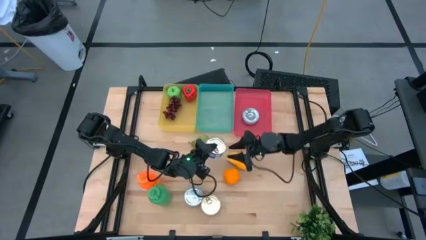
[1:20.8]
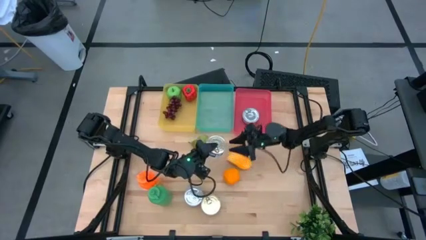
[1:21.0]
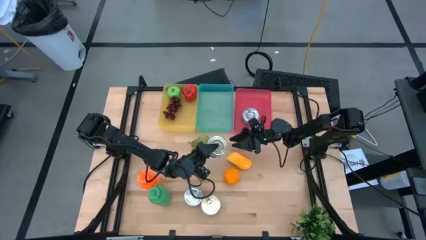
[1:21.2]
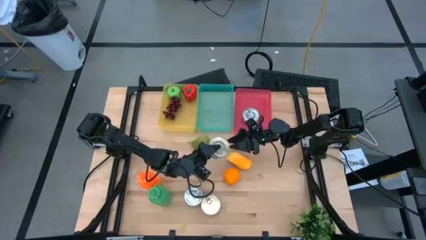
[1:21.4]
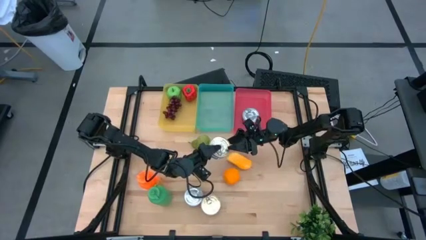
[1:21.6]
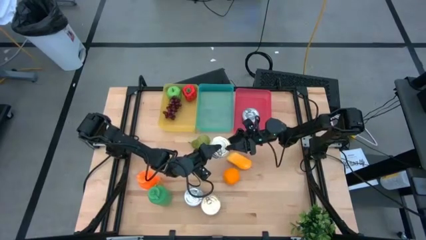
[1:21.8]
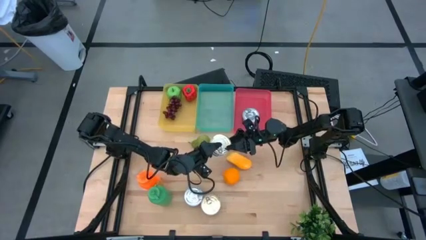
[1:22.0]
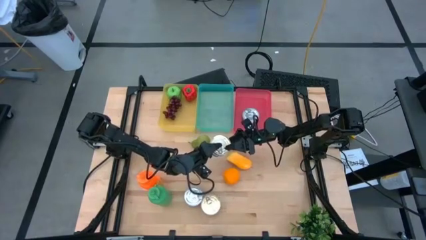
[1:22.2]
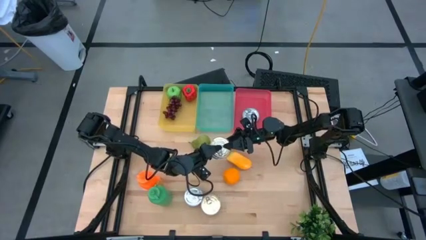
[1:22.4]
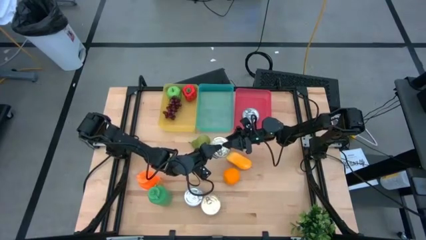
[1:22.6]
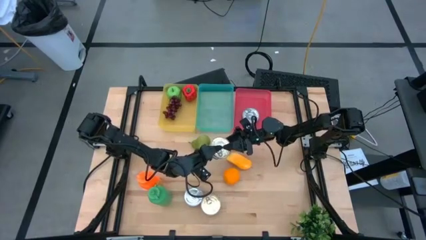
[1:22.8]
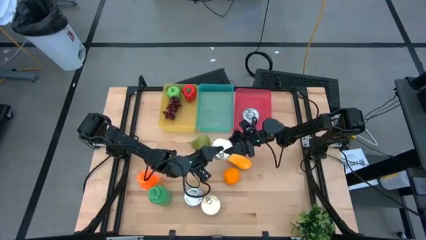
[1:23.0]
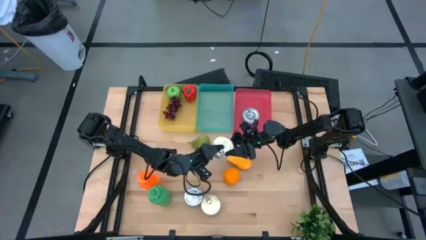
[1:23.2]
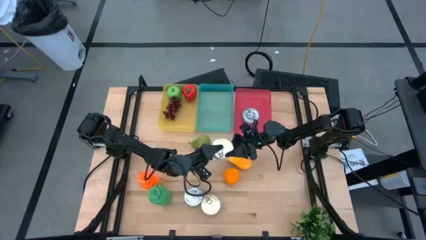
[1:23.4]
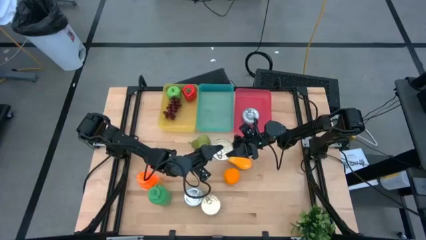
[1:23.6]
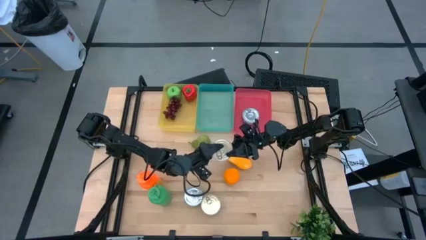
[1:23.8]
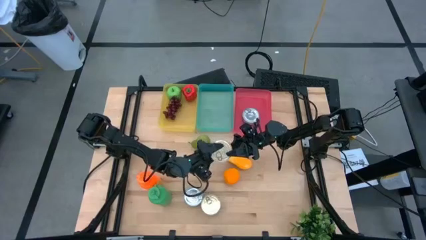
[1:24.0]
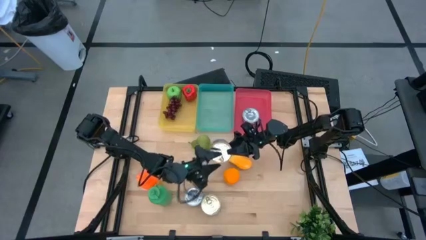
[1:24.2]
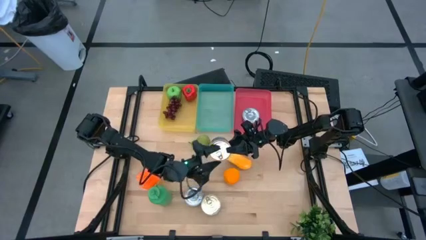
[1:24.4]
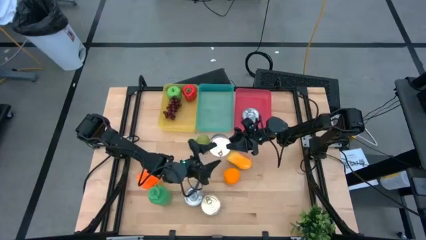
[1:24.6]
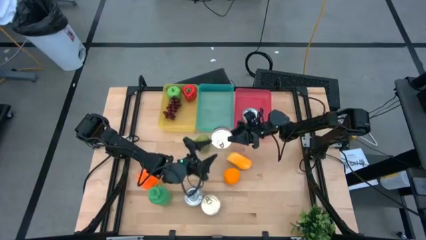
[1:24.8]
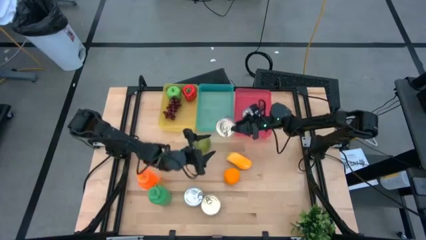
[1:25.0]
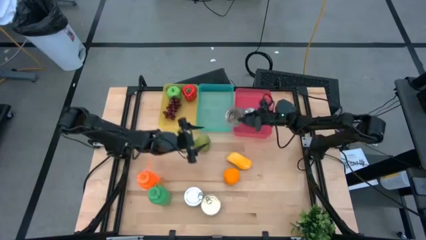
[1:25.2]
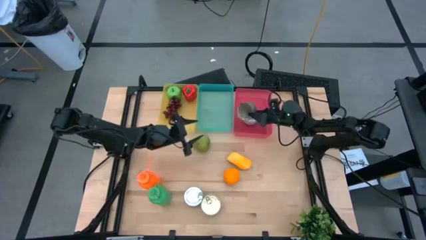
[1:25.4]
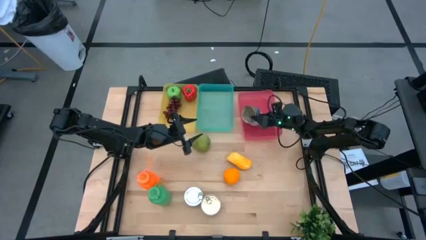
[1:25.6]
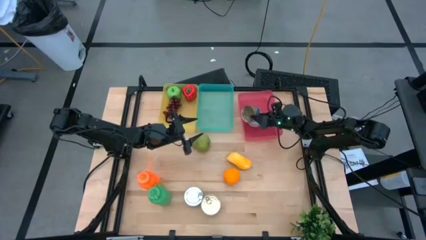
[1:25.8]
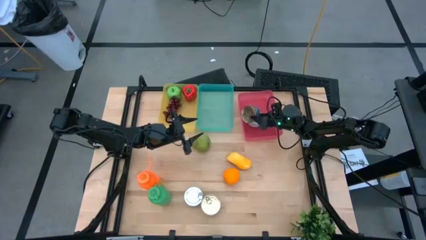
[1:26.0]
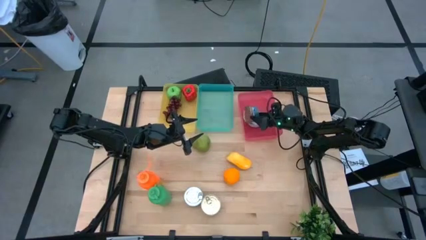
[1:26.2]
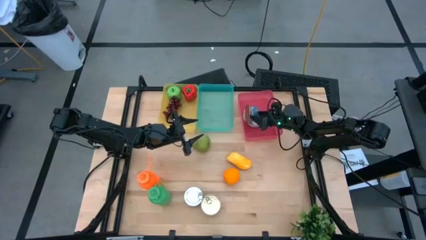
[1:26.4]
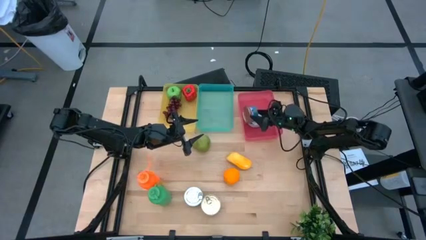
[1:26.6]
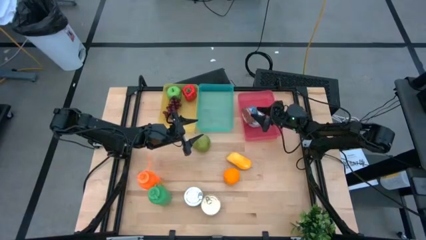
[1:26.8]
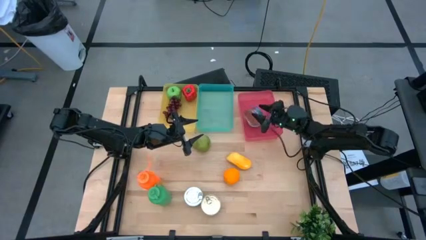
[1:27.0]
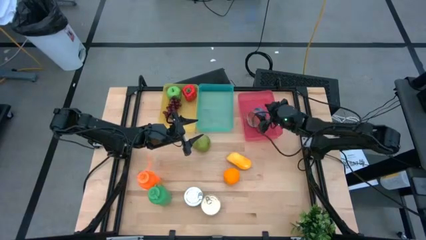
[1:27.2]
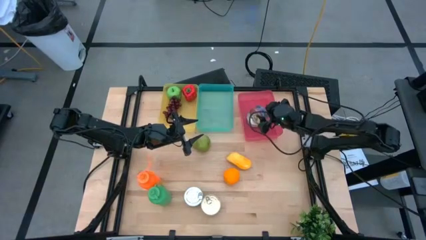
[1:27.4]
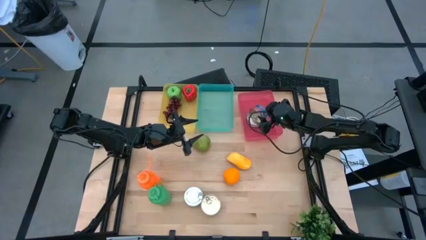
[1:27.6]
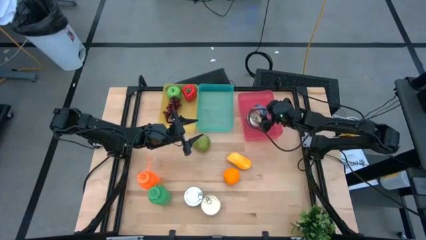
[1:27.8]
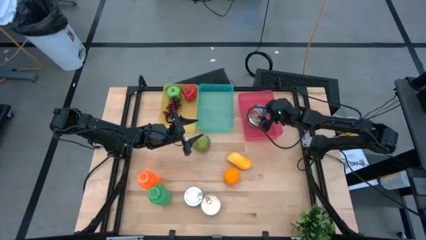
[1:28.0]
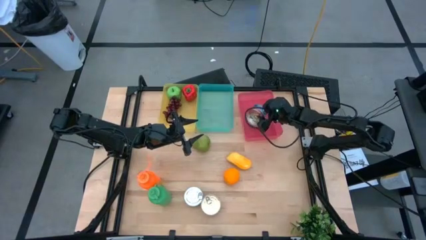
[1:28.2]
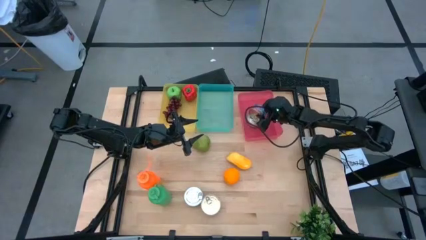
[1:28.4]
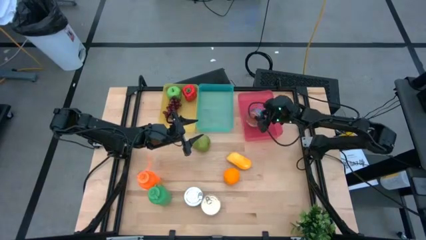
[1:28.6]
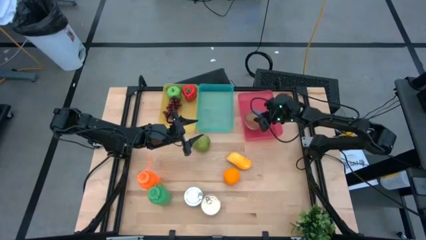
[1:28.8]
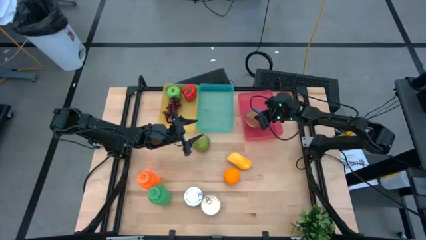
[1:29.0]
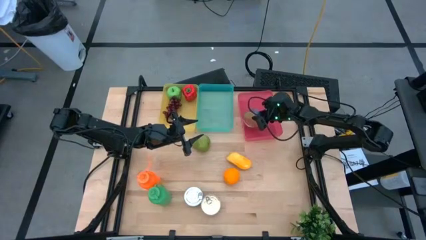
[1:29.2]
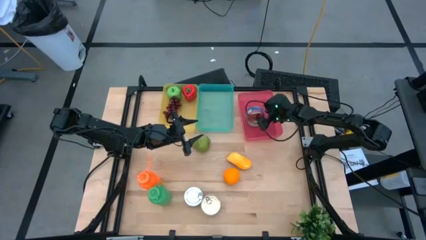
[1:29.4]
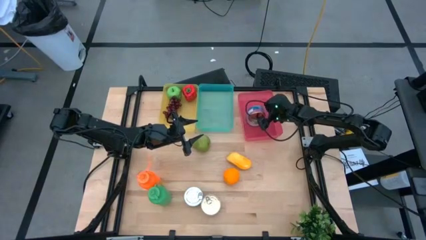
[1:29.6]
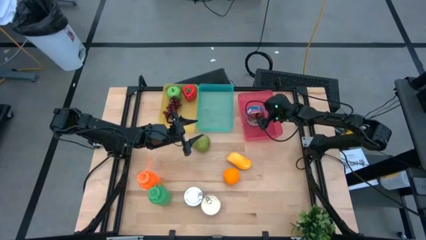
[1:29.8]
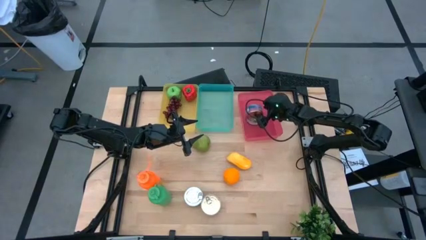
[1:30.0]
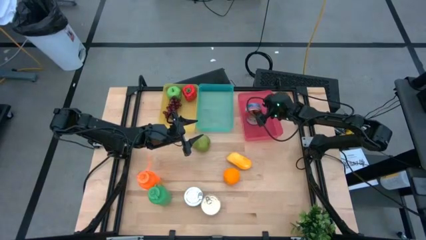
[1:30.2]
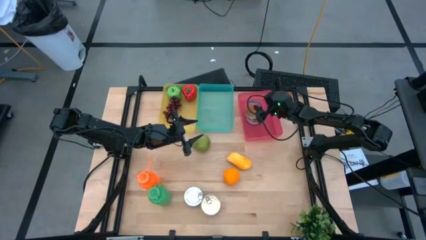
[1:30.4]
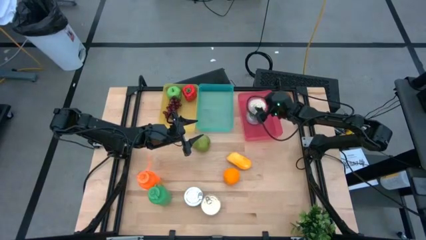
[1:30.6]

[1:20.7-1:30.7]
Task: Pick & Place Food Item
Put the top blue pink tuna can into the red bin

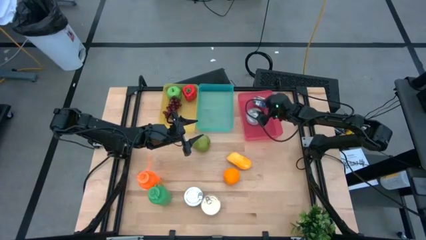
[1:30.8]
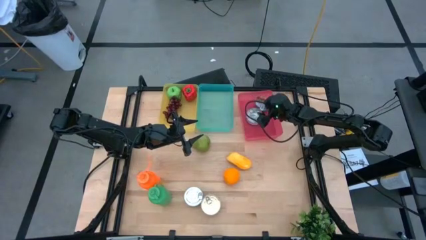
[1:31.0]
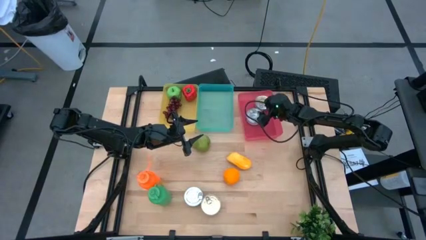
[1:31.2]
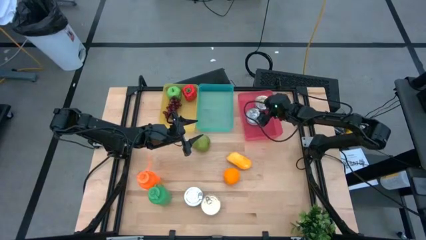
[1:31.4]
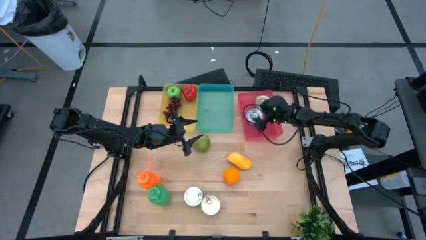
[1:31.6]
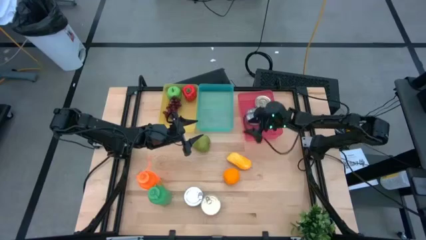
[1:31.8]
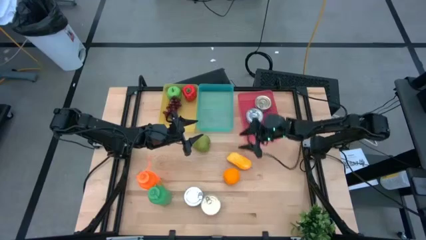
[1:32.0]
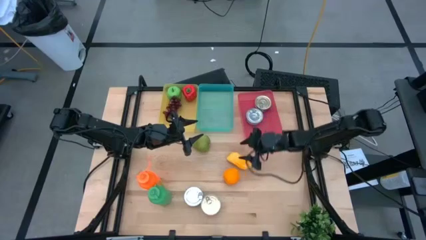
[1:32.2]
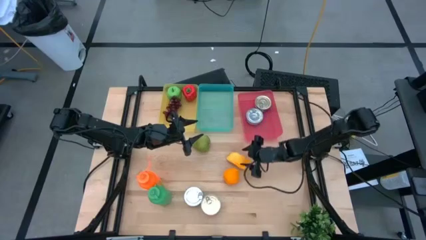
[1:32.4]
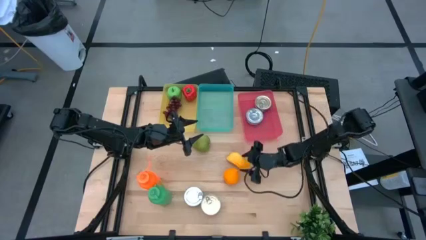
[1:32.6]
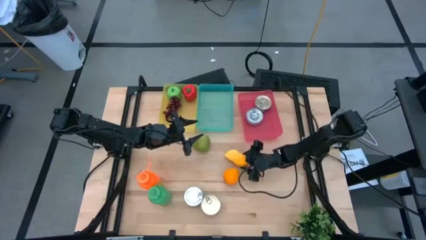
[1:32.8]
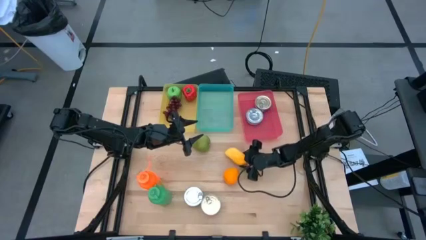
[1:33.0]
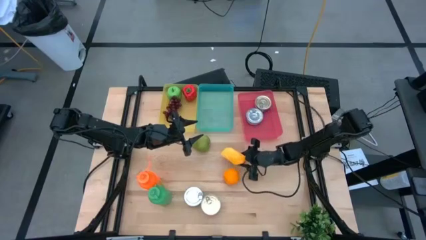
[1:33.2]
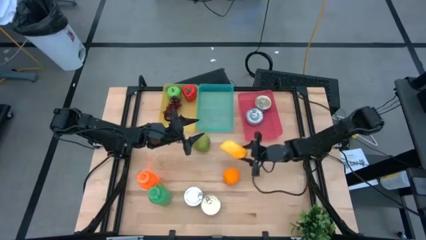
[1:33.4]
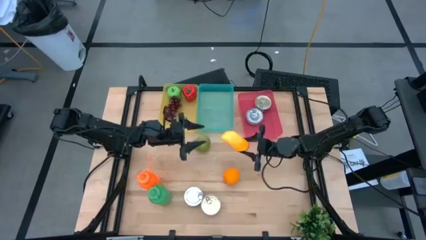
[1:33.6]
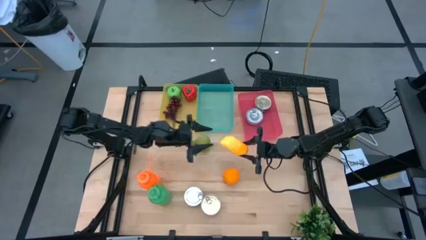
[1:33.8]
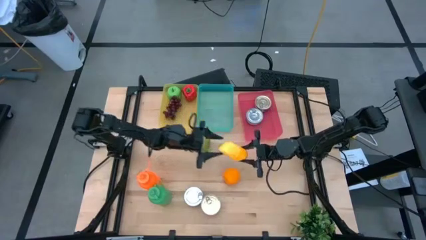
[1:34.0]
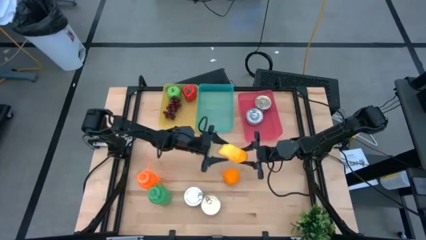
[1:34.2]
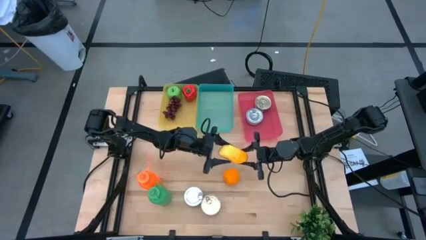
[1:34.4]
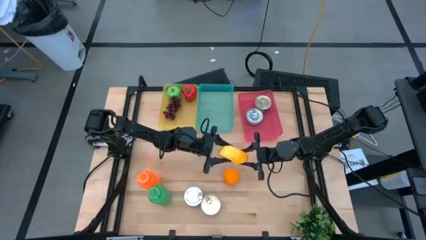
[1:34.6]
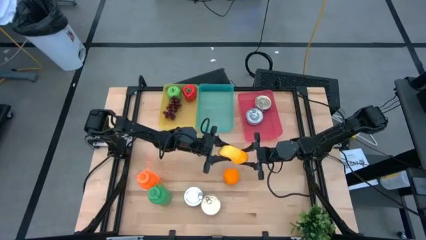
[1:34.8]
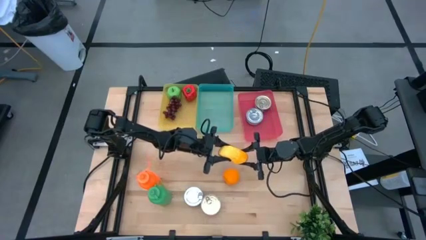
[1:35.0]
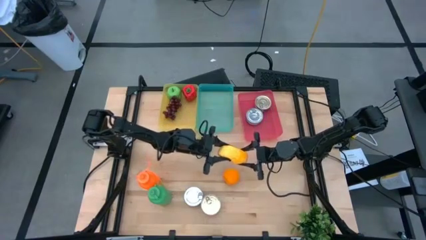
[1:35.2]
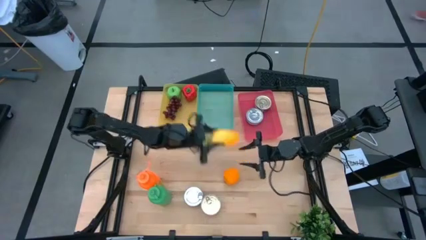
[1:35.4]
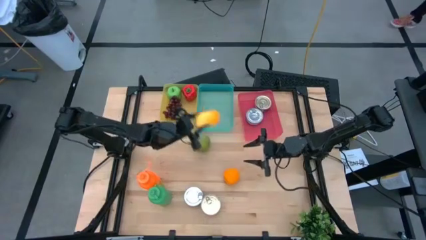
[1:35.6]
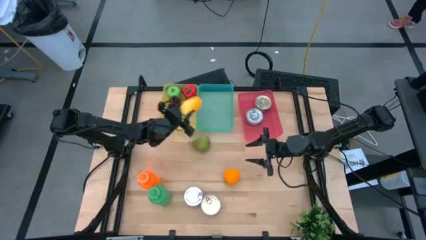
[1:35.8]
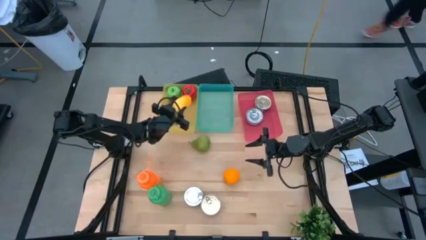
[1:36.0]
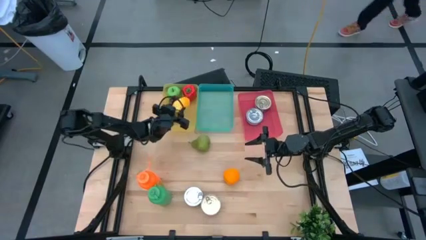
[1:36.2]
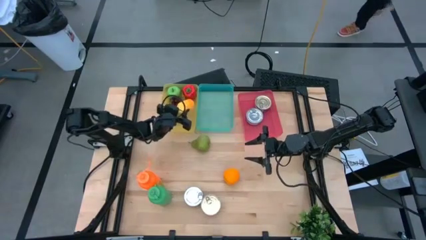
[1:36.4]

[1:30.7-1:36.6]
Put the yellow mango into the yellow bin
